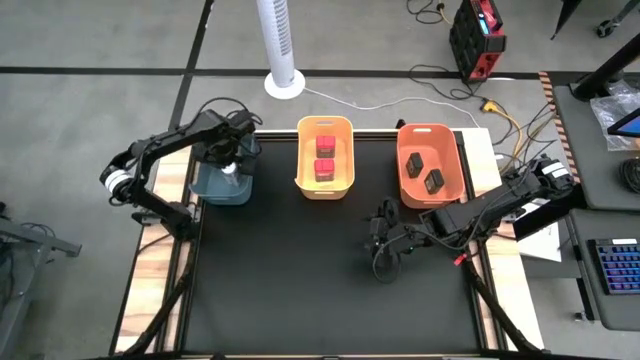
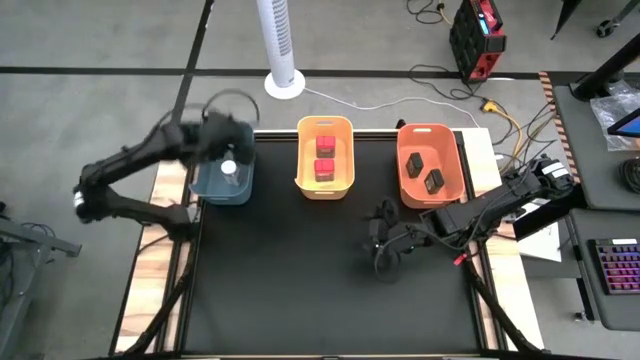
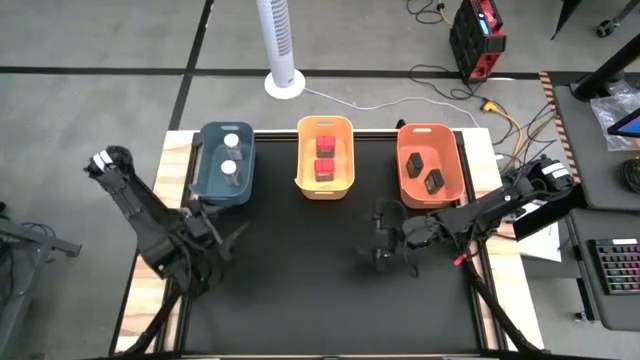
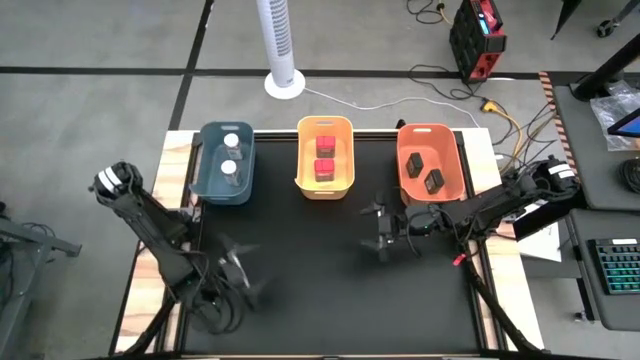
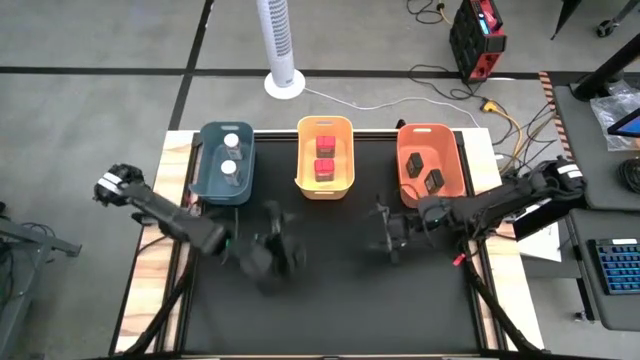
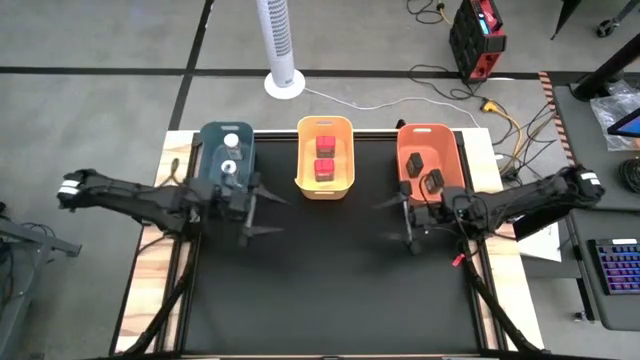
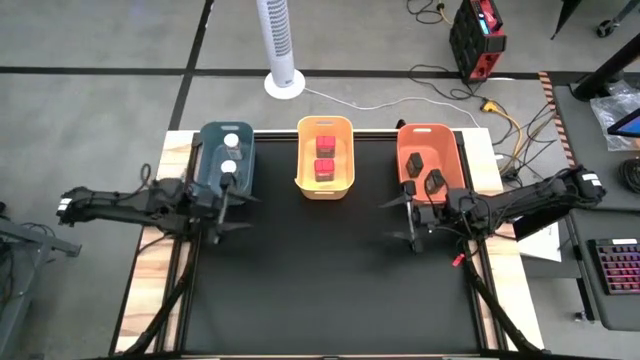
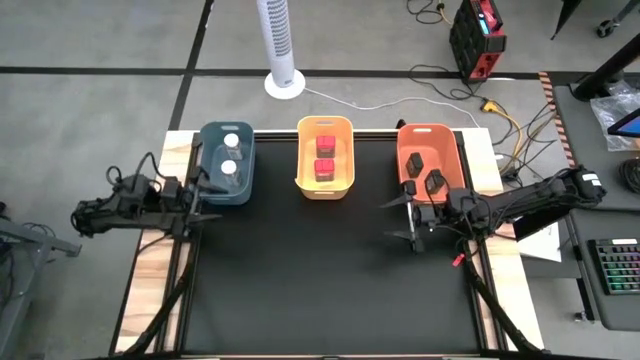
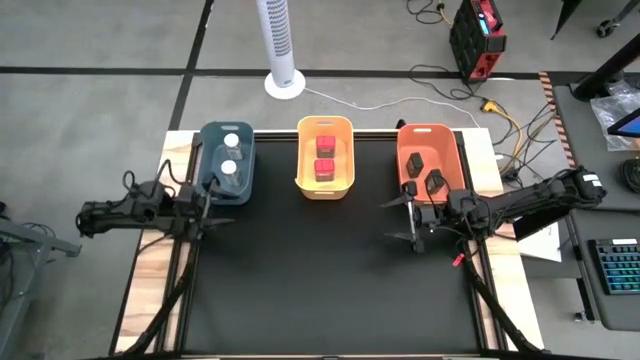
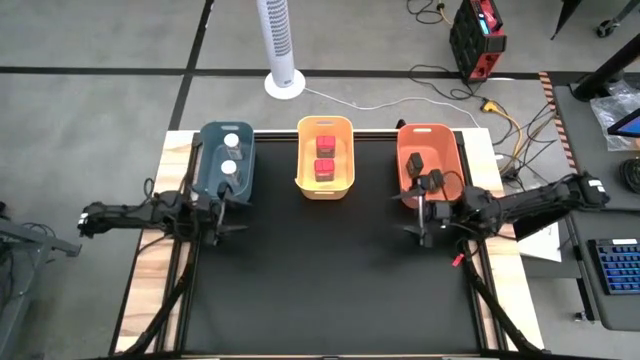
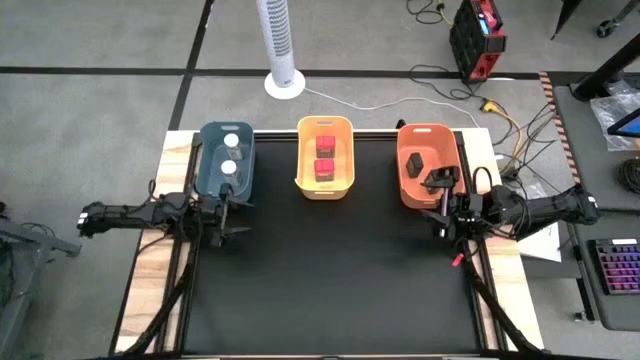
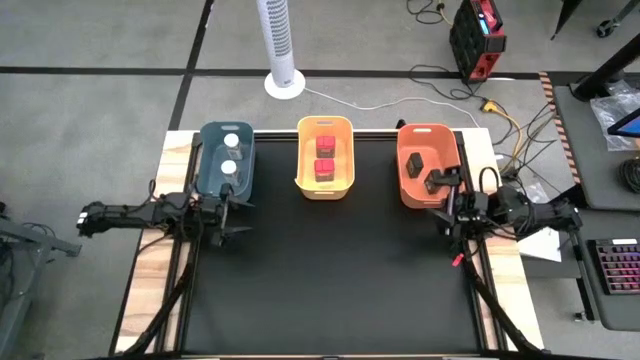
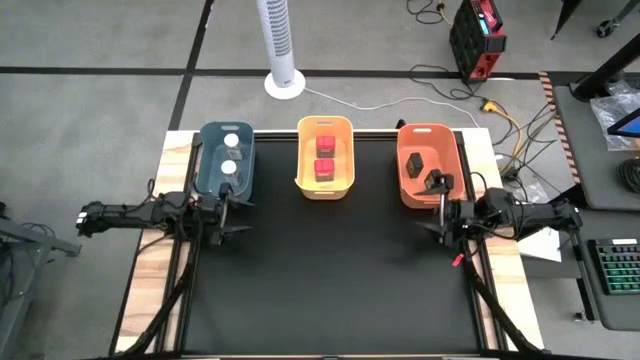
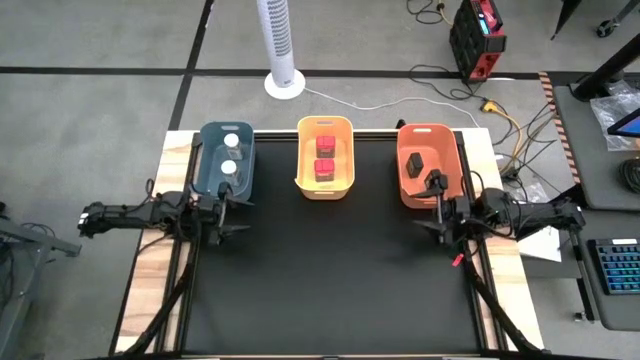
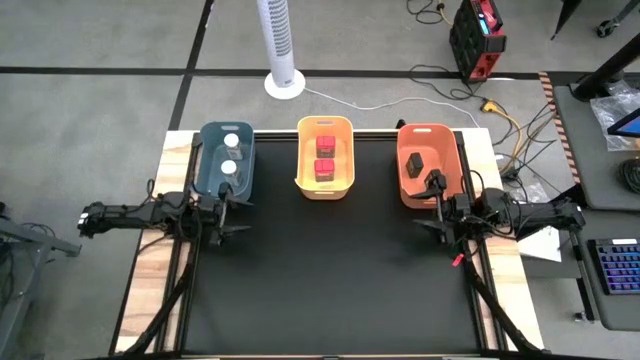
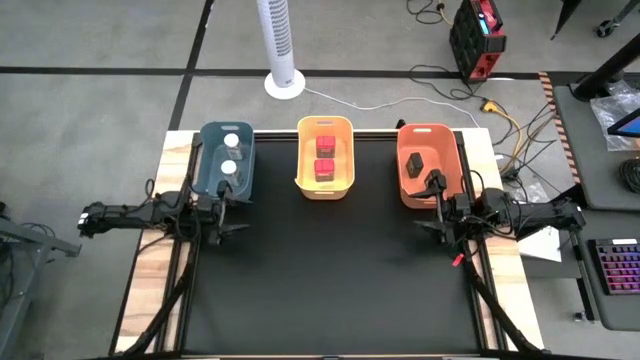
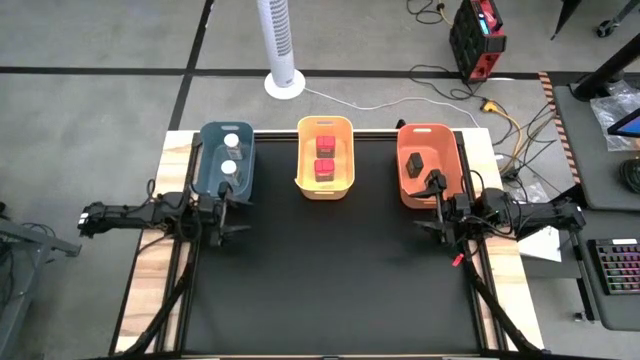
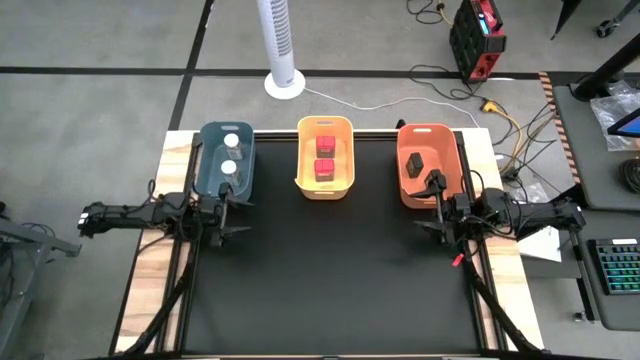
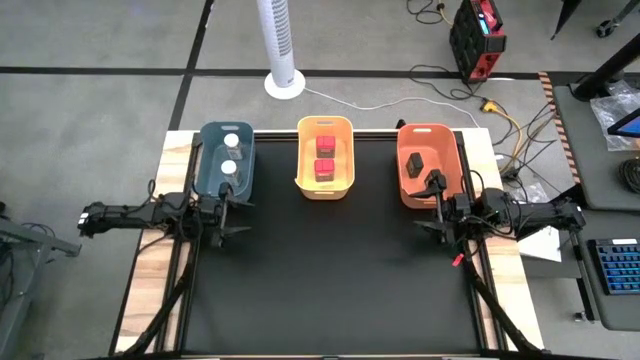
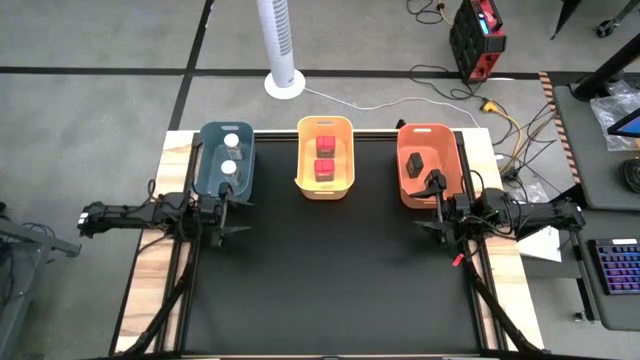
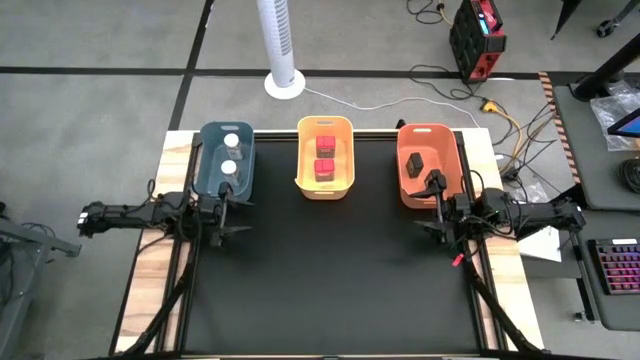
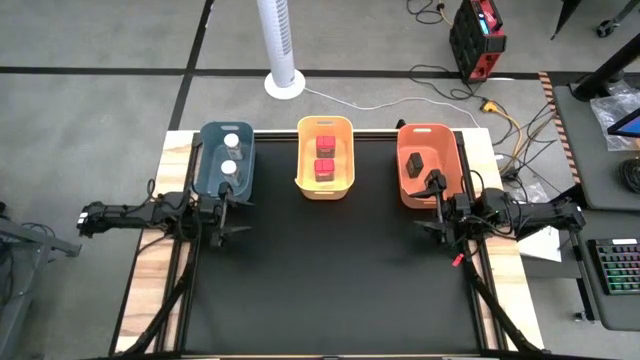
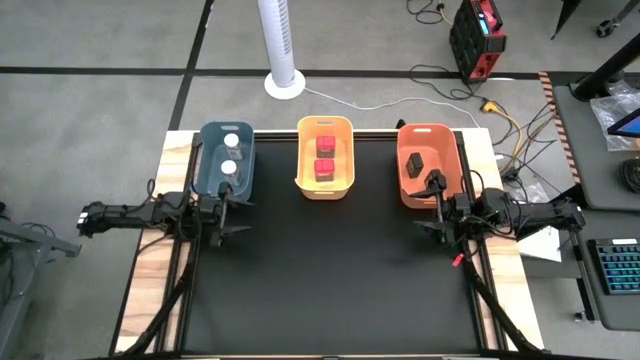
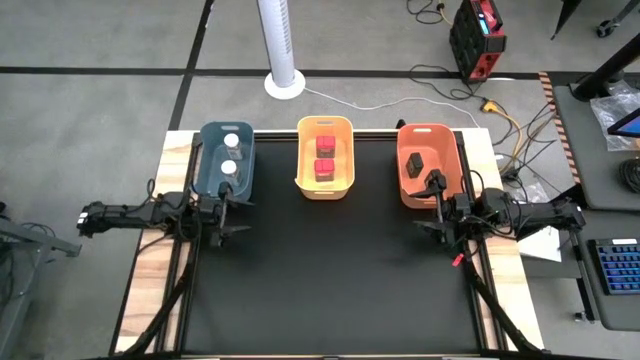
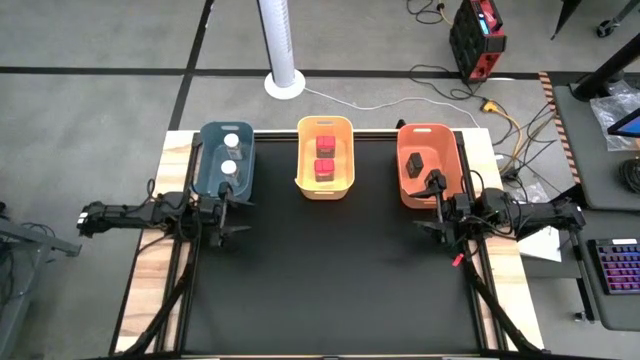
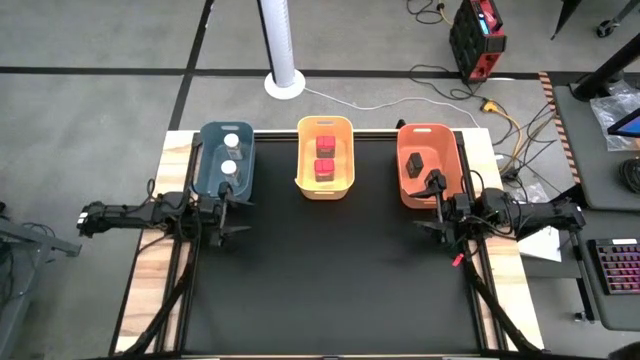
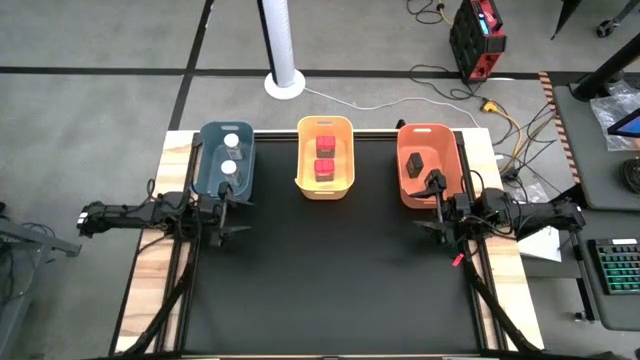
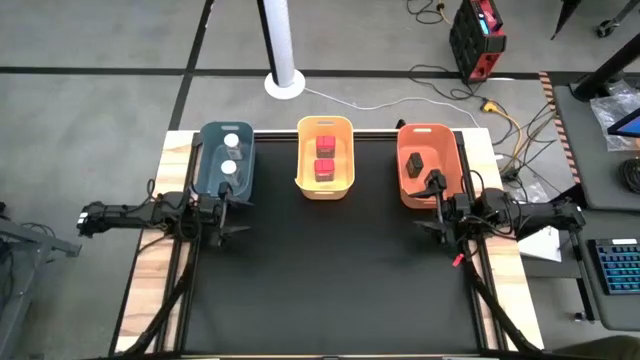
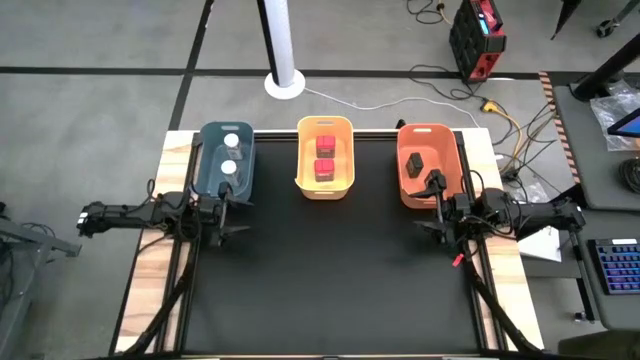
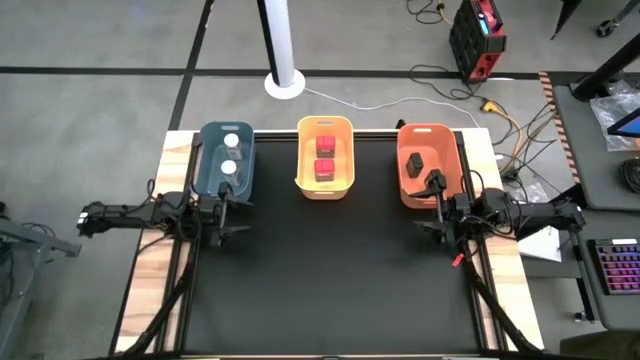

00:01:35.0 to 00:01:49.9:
Task: Sort spices by type
Return to Home Position

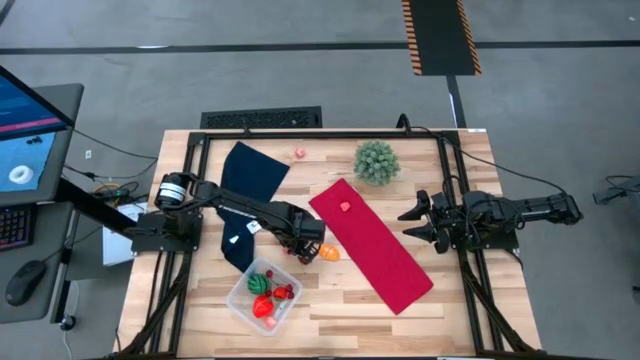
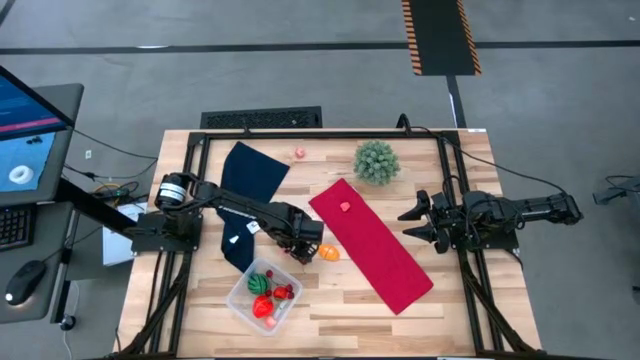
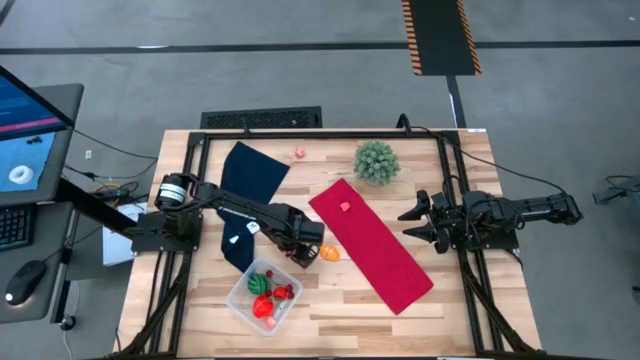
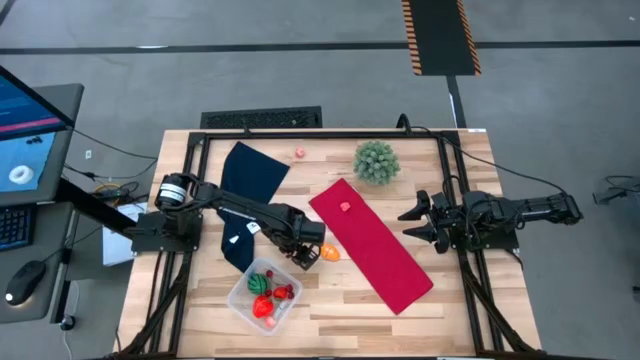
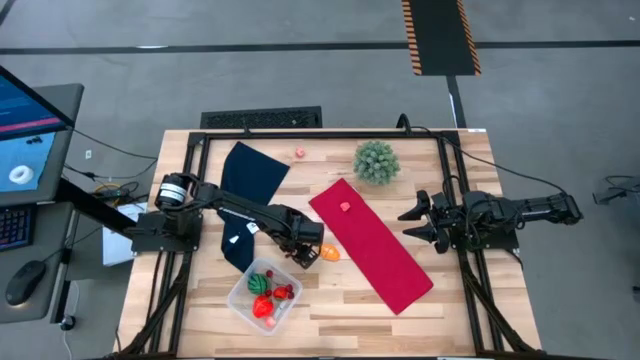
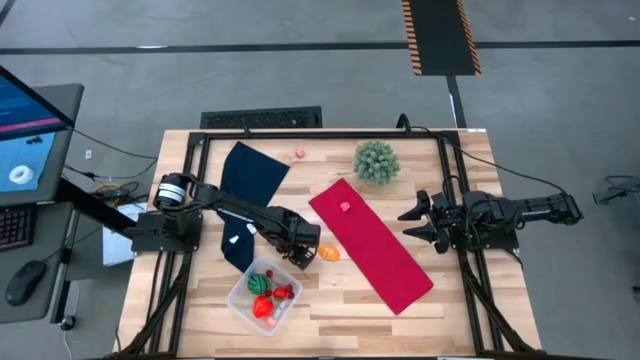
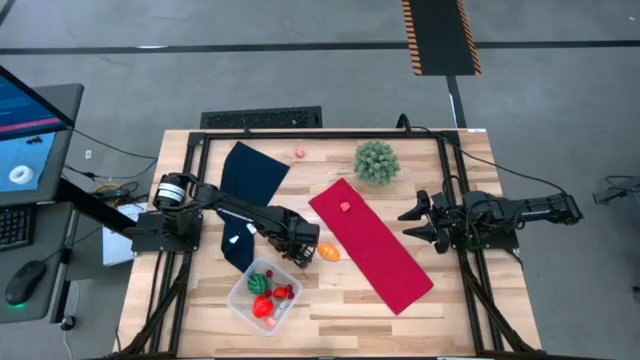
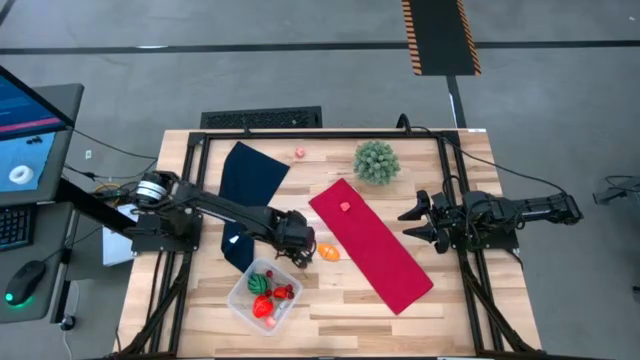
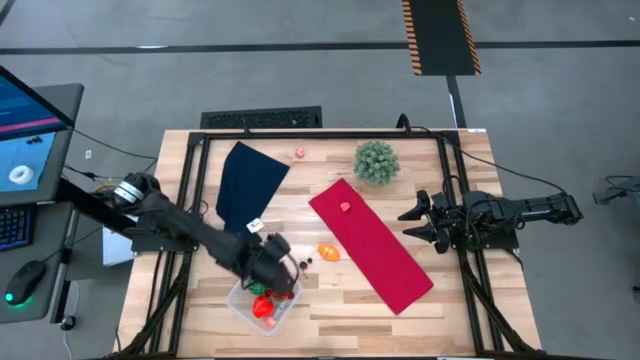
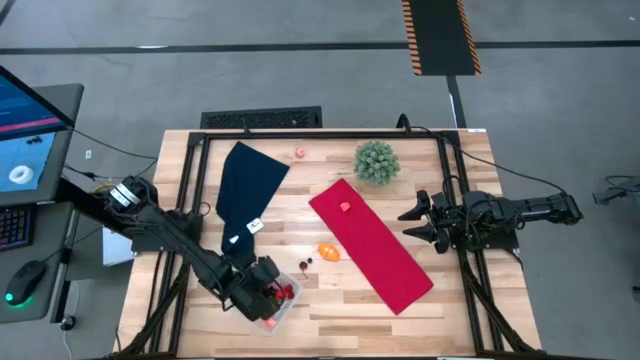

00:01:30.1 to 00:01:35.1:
Task: Pick and placing Produce into tupperware
Put the peach fruit into the transparent bin

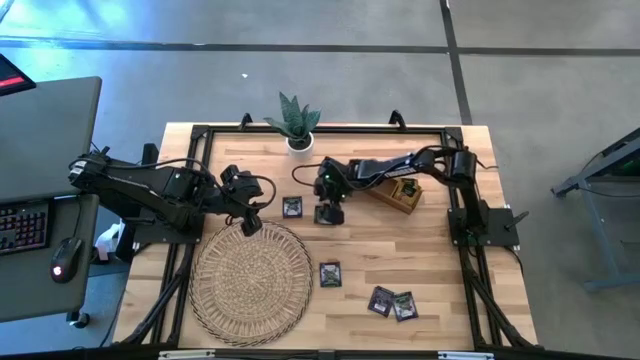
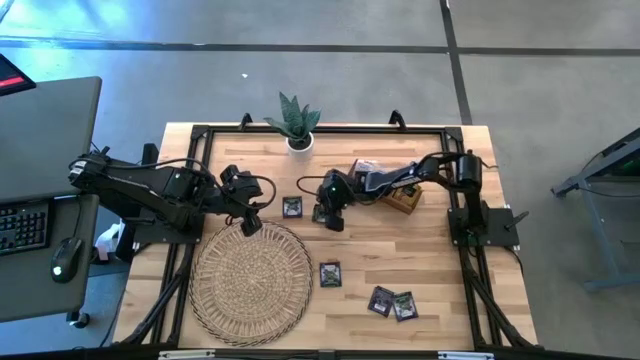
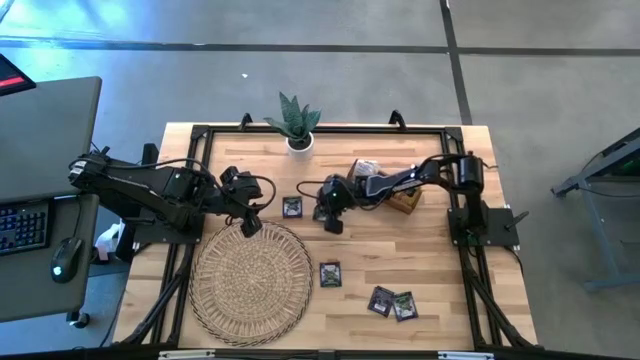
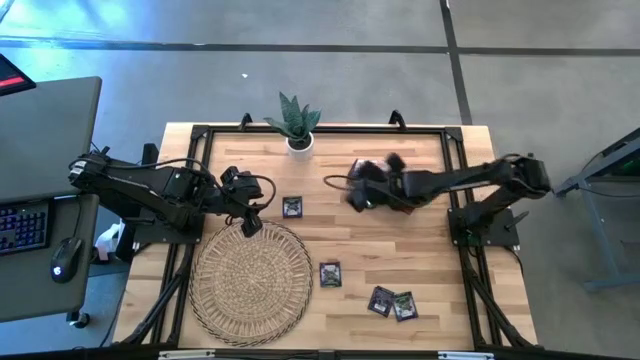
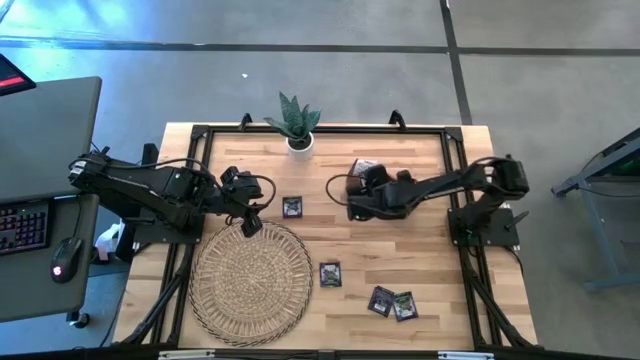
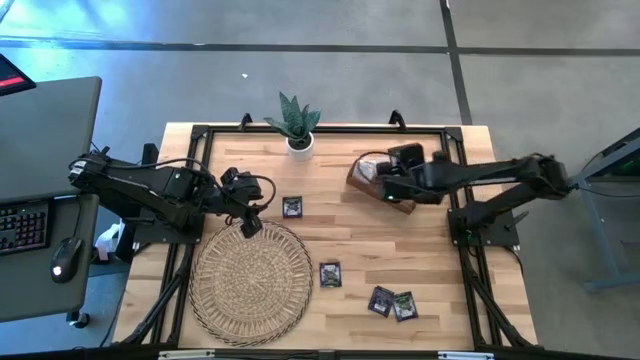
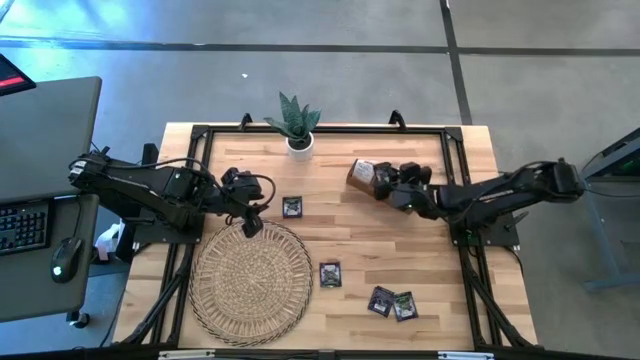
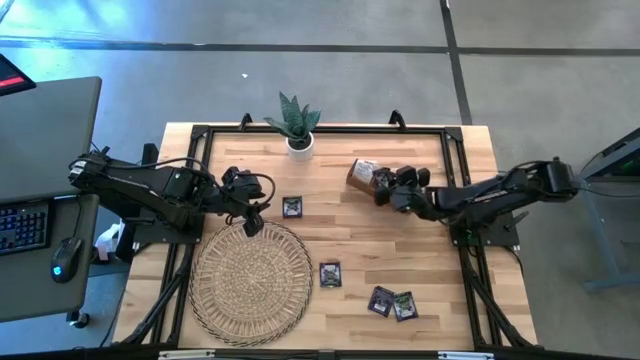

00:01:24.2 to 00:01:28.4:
Task: Pick & Place Tea
Put the black tea bag into the middle section of the wooden organizer
